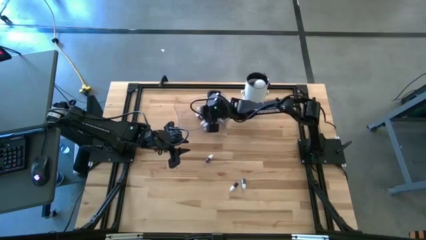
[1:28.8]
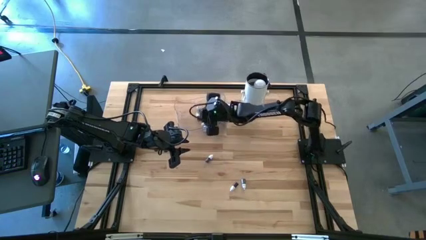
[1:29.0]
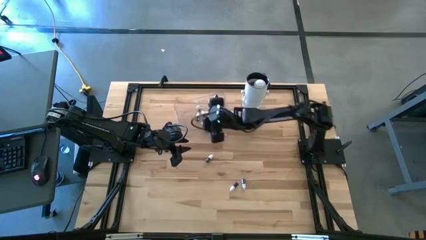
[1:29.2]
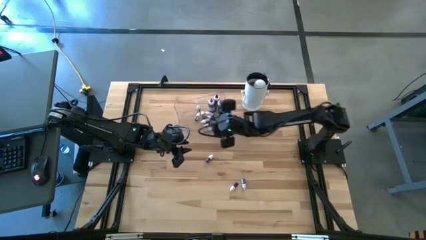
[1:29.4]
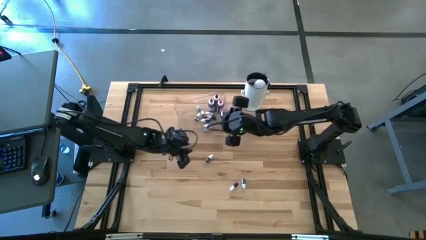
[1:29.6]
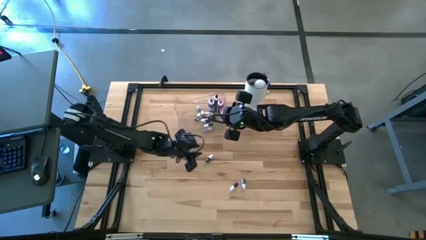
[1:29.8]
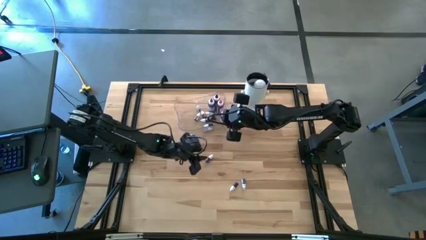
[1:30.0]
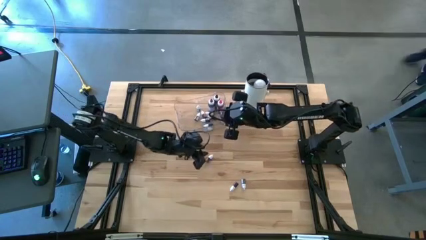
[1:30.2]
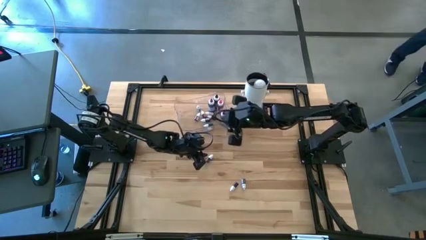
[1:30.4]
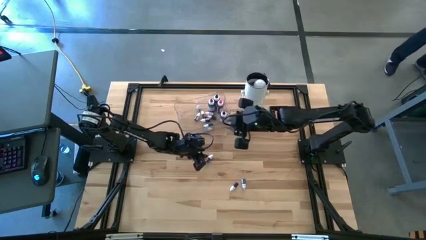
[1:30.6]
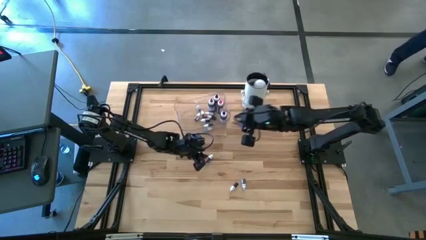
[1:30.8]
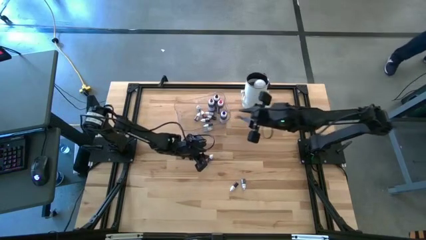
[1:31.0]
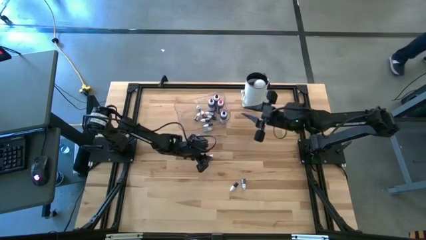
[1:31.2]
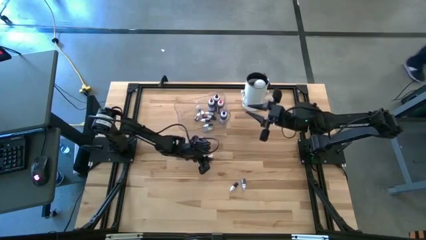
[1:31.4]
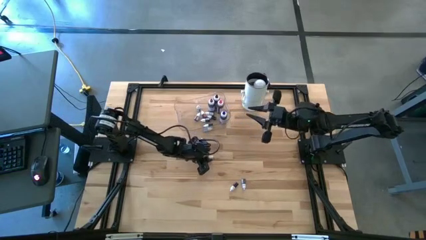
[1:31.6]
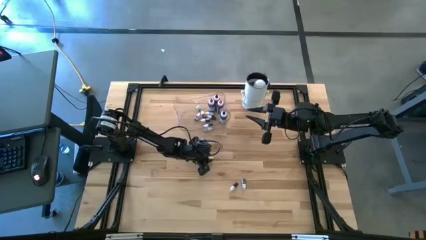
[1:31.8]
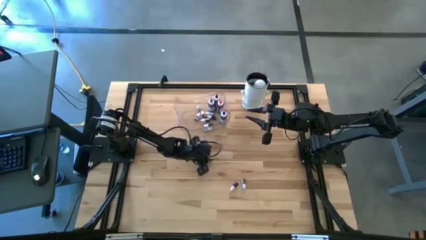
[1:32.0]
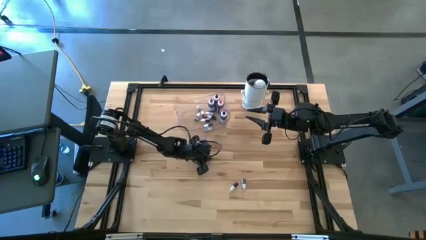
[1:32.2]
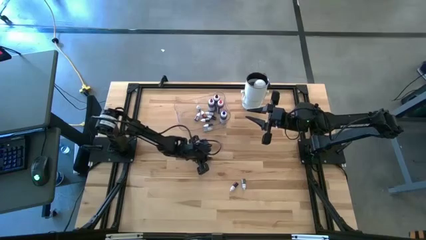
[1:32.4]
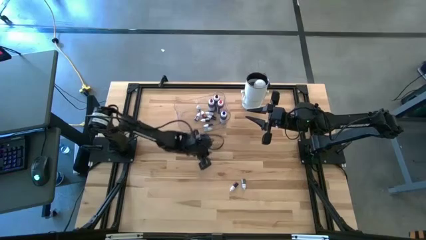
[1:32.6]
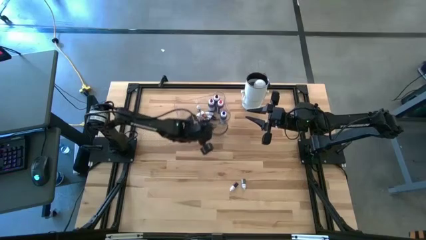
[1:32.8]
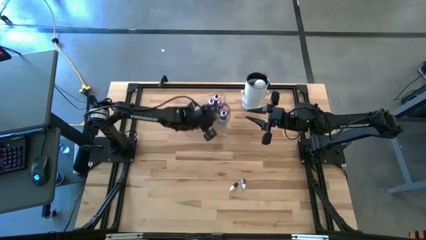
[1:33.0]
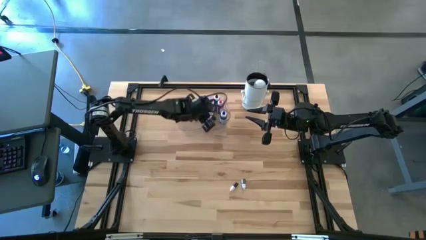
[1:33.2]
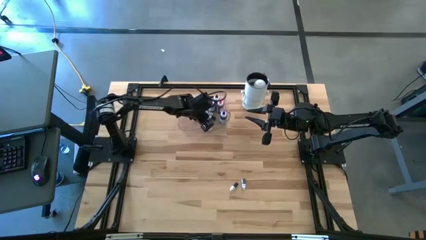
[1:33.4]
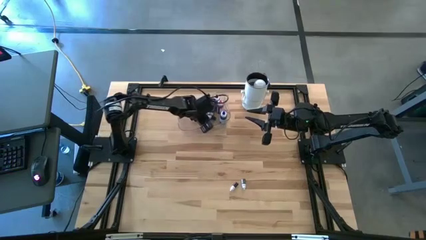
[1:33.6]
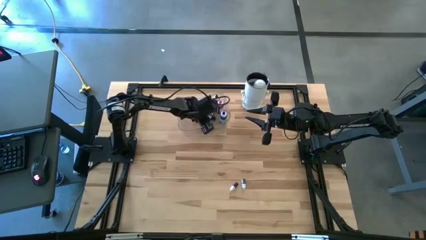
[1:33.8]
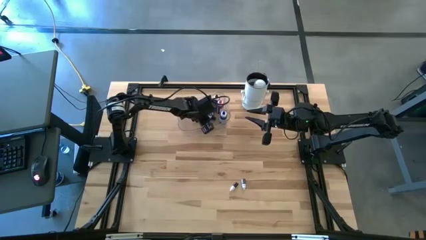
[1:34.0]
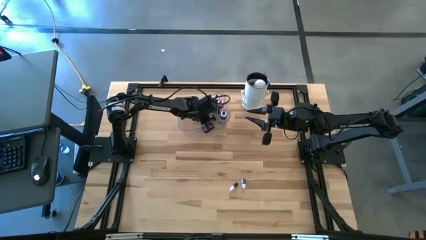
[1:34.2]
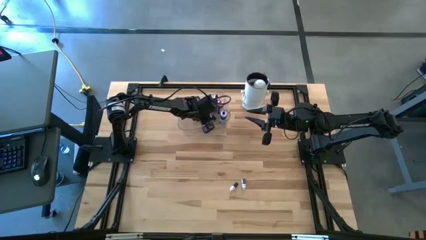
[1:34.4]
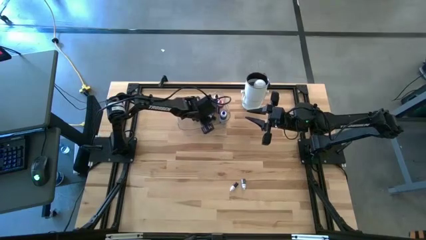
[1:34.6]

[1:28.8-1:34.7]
Task: Pick & Place food coloring
Put the small green food coloring bottle into the transparent container

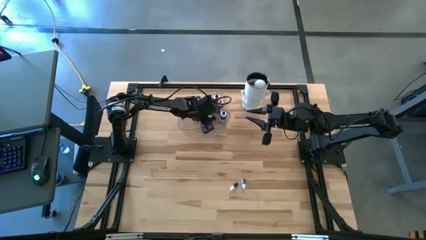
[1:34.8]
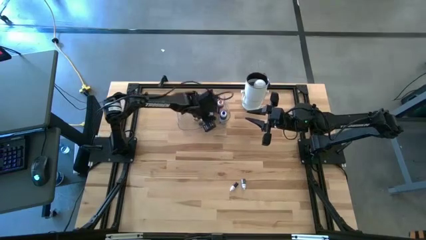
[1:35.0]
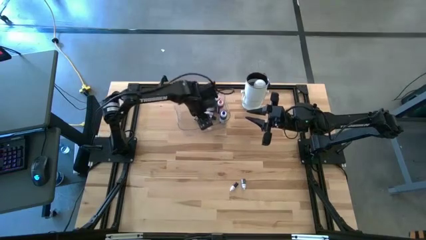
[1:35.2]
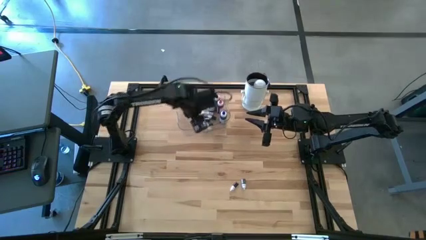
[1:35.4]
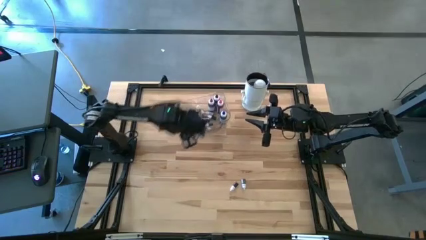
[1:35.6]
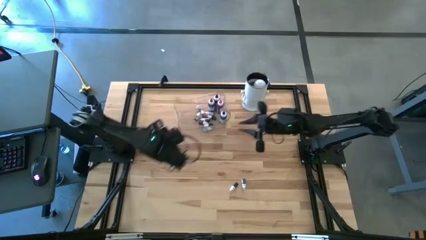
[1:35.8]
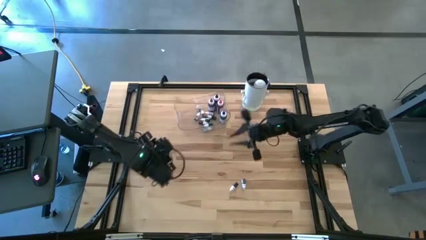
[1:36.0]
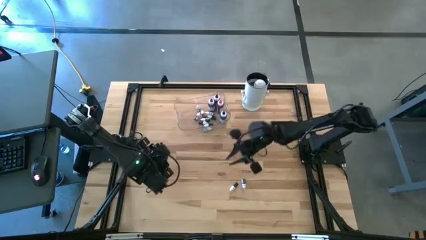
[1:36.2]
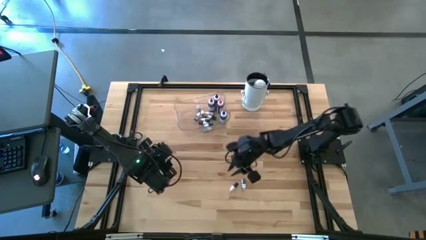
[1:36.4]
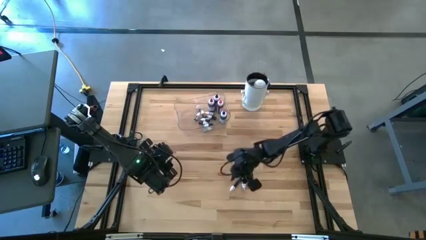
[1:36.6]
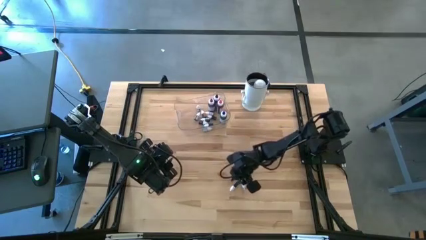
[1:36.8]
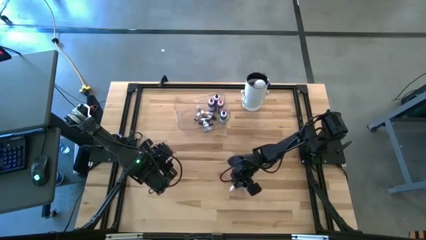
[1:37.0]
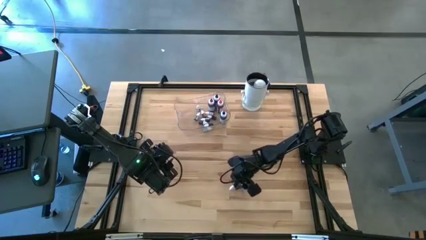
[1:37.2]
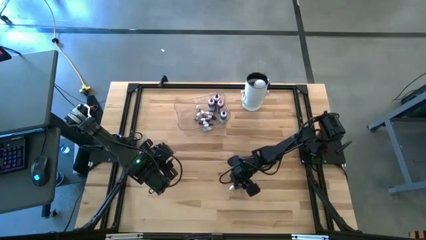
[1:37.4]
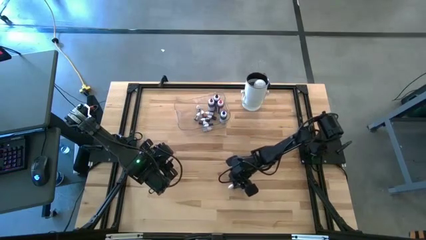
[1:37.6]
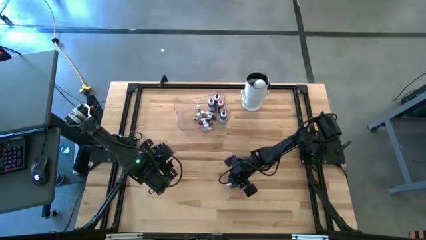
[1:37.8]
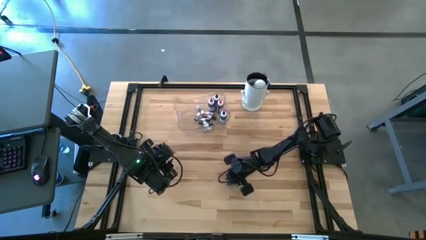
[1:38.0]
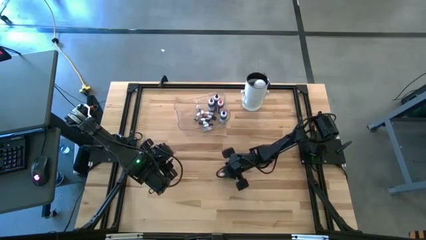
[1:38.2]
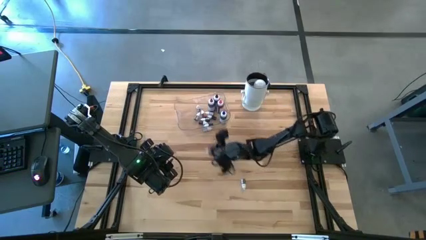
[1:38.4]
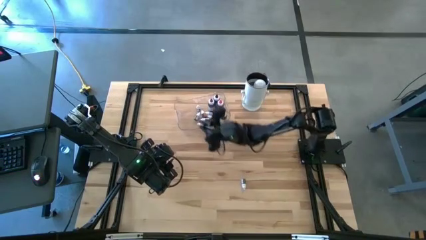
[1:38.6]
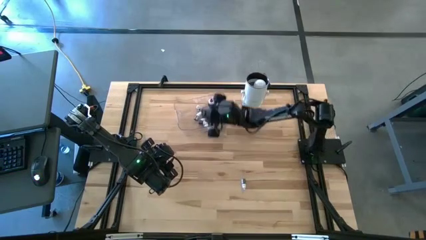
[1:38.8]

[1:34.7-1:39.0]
Put the small red food coloring bottle into the transparent container

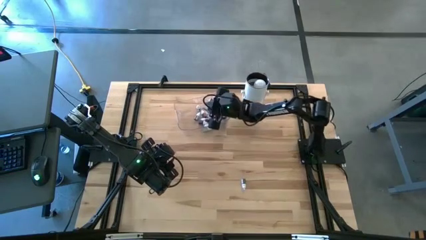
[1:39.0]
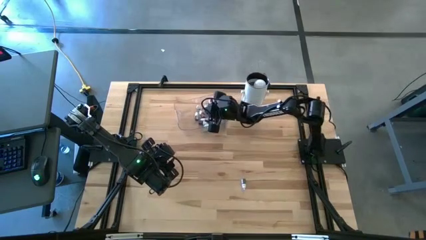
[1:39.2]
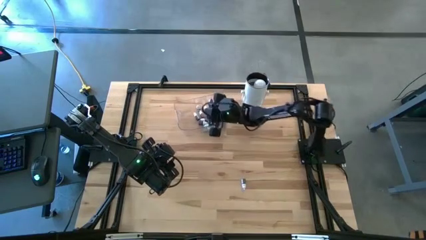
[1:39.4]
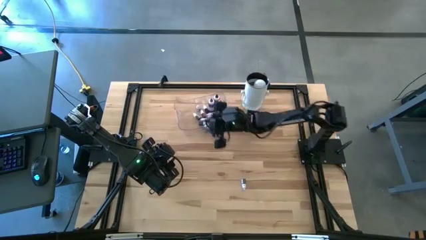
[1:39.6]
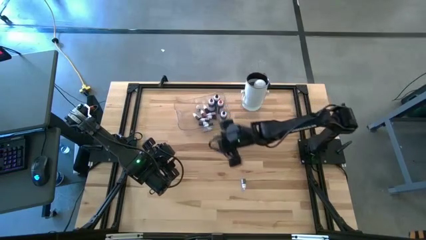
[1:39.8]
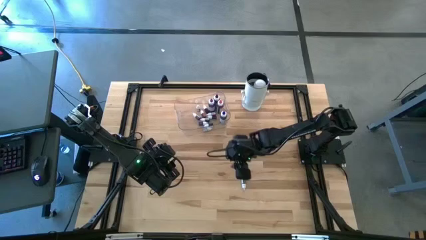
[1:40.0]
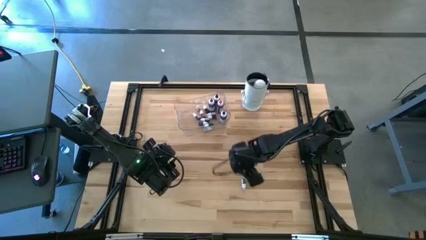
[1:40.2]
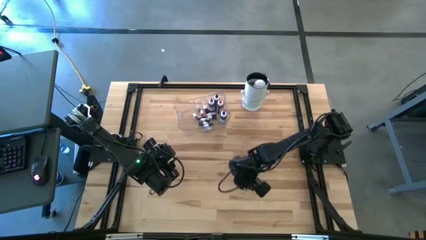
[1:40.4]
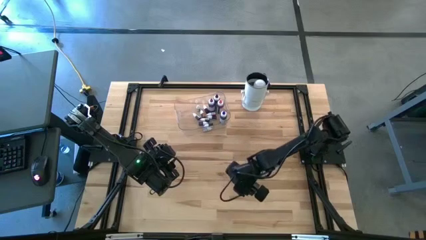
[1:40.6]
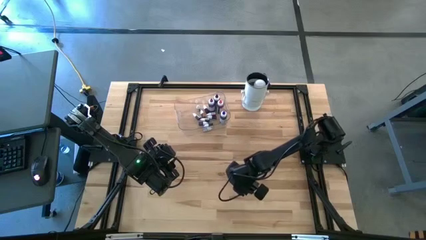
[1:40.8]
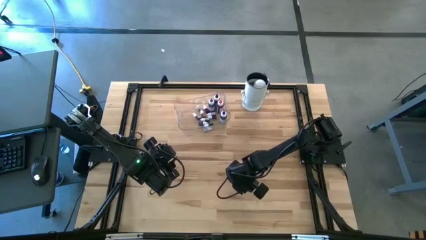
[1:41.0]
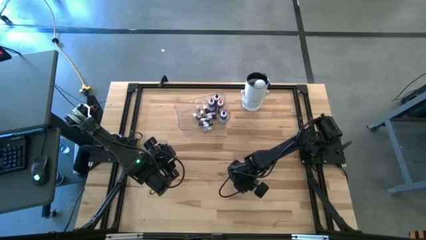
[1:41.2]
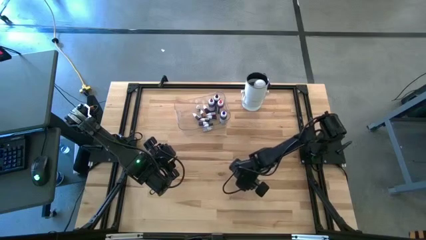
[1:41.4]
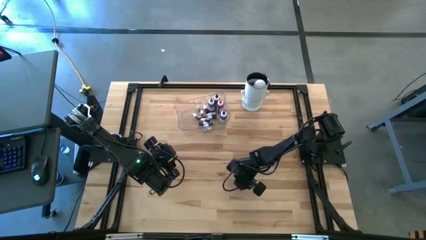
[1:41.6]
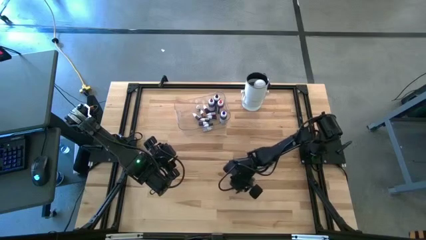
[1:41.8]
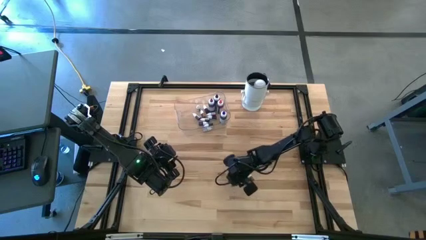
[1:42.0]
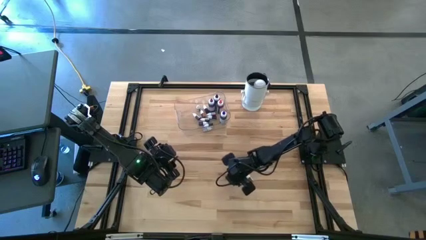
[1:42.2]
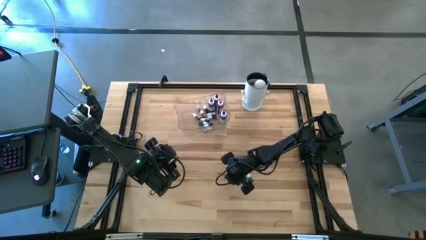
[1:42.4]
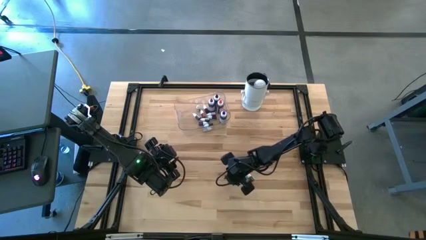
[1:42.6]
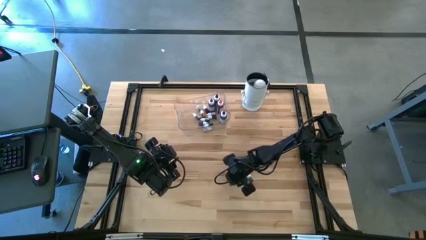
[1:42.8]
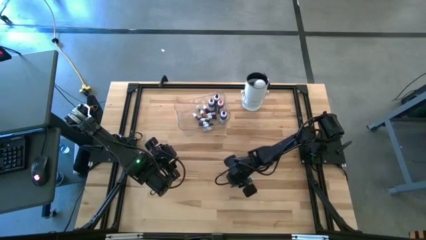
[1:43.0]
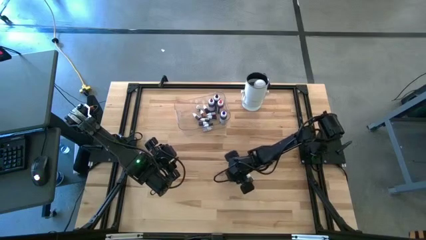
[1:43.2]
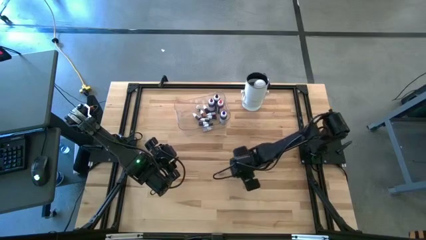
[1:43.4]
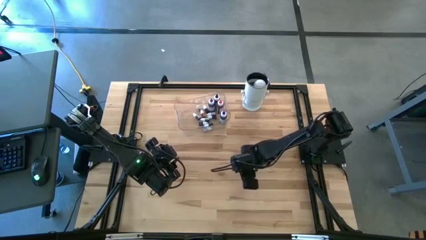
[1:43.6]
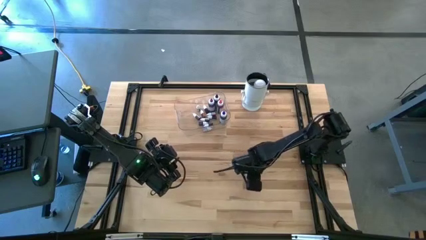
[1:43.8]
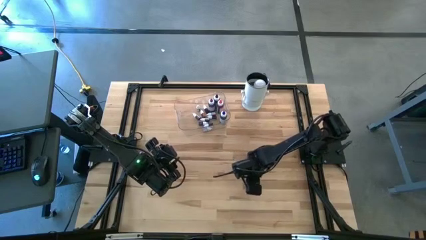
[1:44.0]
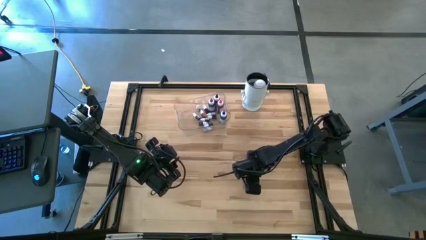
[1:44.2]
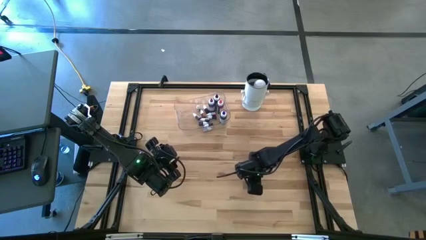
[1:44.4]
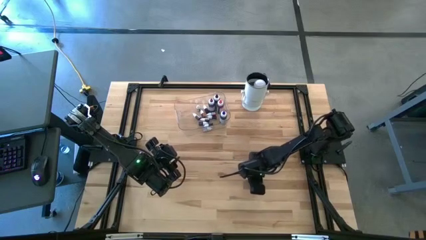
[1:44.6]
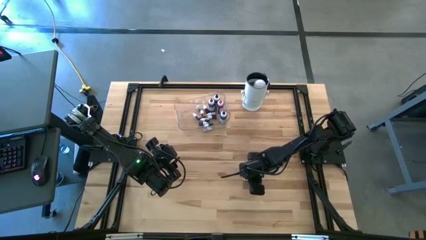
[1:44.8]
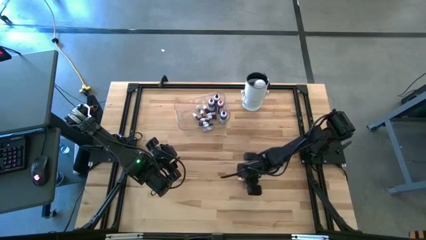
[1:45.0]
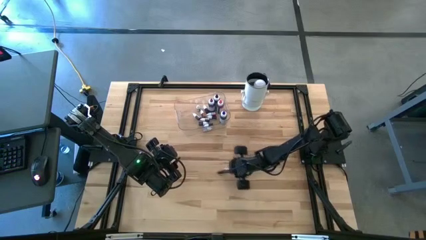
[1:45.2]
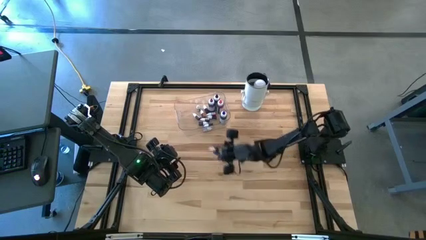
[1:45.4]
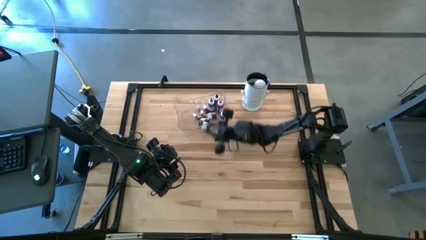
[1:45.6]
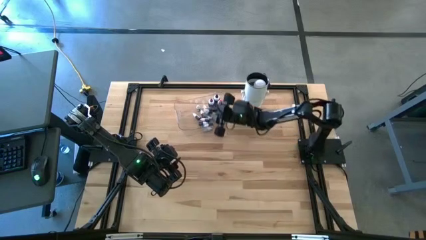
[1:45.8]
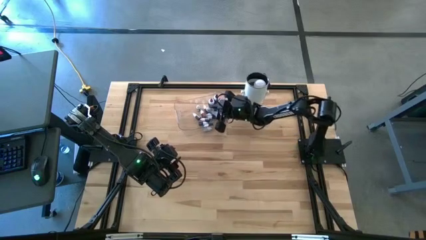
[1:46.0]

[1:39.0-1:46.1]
Put the small green food coloring bottle into the transparent container
